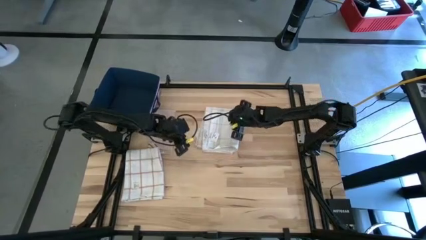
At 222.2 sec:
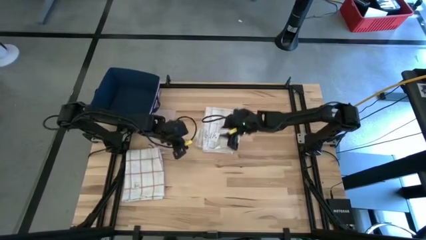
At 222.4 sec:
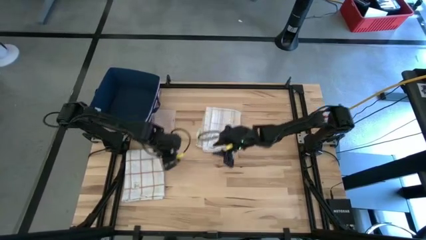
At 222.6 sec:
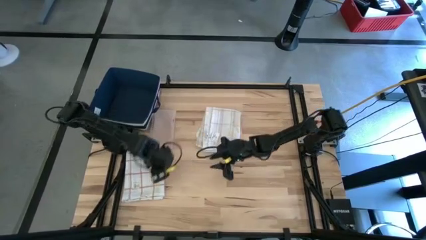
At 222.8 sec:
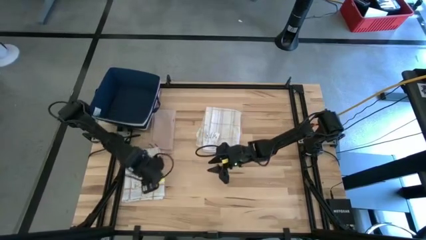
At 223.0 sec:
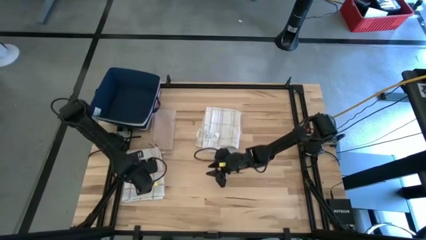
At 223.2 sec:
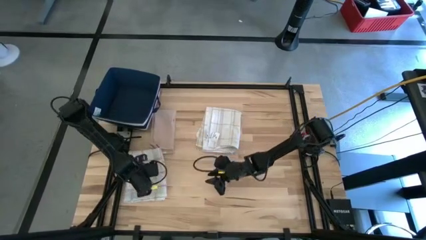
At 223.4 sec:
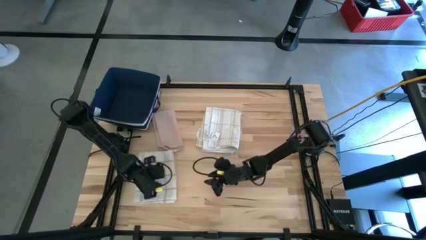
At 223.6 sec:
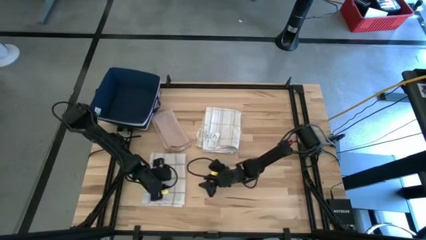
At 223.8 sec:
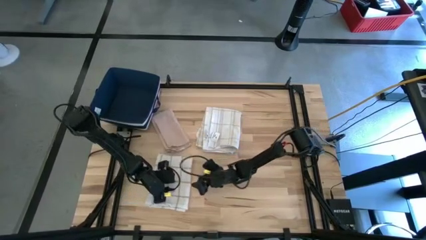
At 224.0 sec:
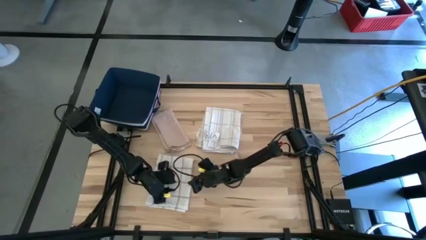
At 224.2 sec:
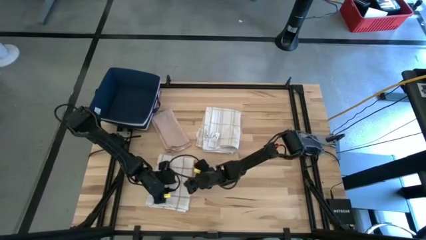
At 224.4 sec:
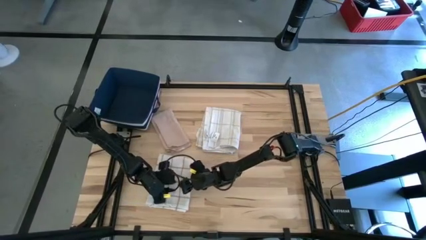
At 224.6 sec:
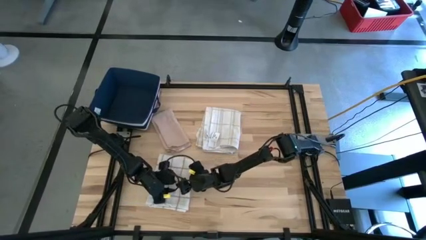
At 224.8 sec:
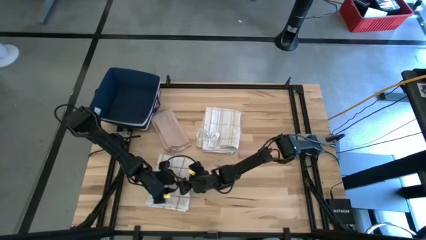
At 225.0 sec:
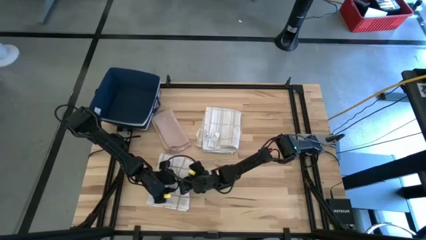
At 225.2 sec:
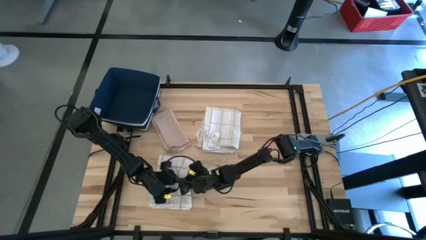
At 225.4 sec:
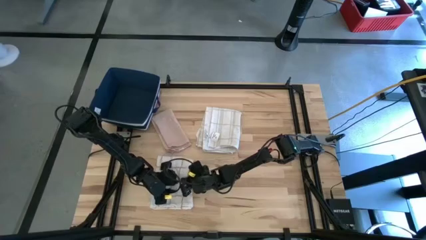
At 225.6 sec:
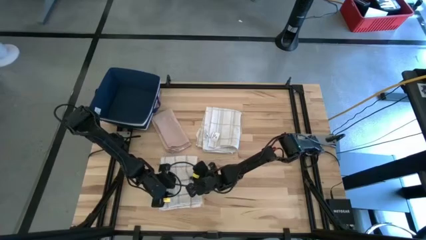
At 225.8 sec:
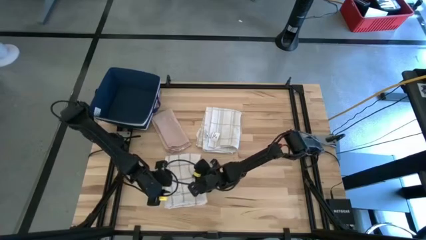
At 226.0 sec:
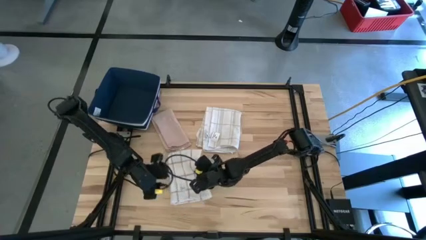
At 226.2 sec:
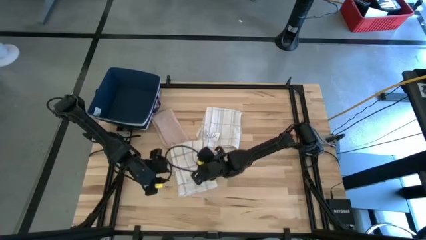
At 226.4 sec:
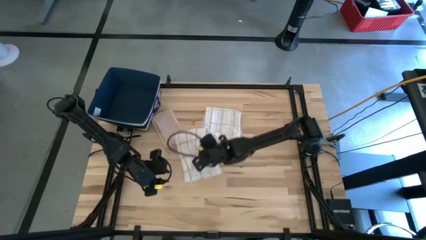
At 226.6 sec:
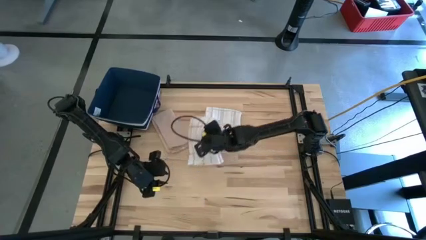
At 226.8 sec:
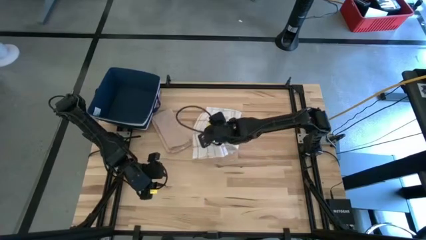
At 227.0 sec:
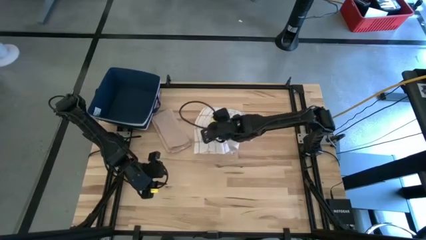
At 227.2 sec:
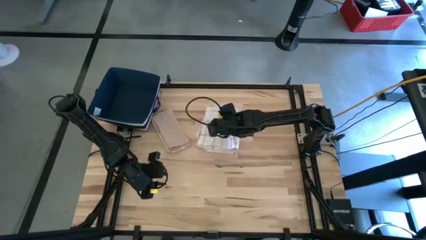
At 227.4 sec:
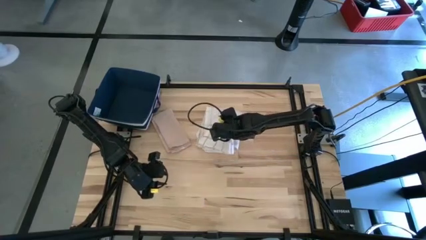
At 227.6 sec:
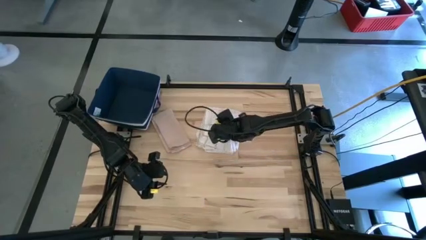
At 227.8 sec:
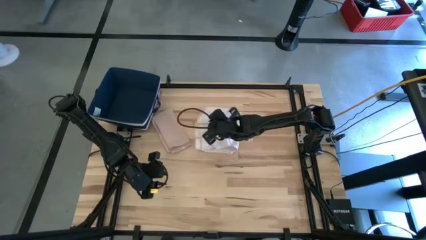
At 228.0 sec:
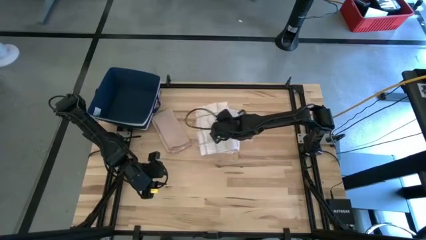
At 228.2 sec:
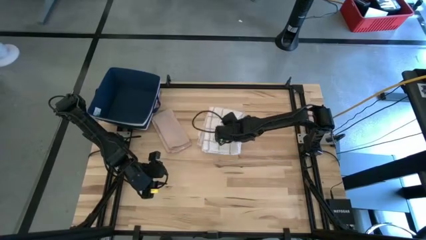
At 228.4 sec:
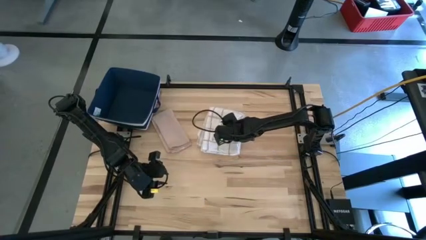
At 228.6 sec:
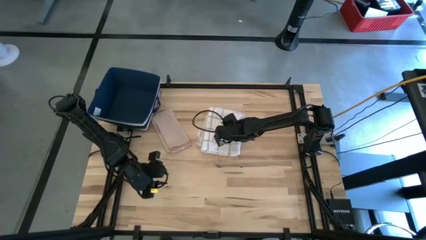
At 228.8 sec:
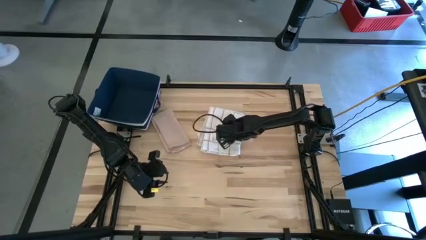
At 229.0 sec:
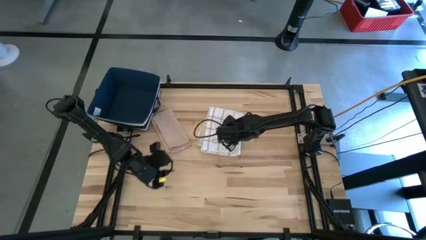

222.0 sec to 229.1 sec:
Task: Fold towel
Stack the left white patterned towel on top of the right white patterned towel

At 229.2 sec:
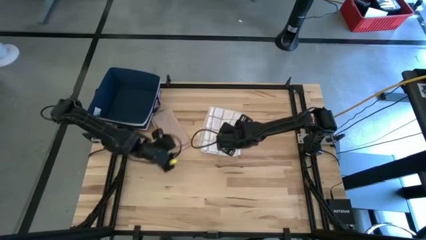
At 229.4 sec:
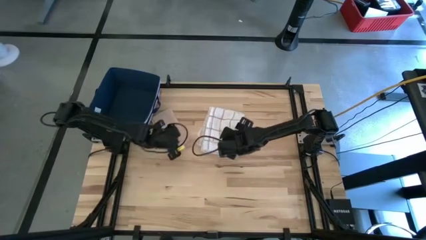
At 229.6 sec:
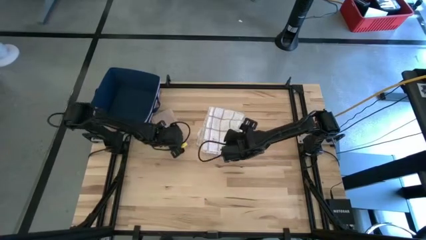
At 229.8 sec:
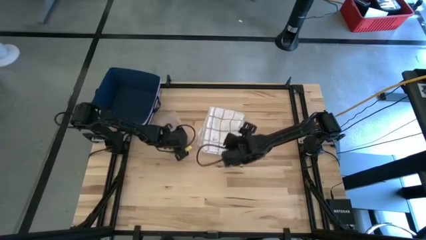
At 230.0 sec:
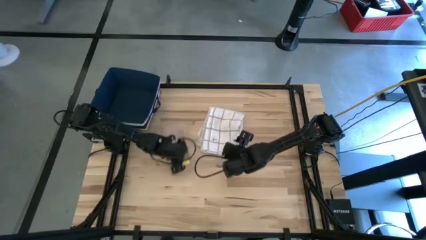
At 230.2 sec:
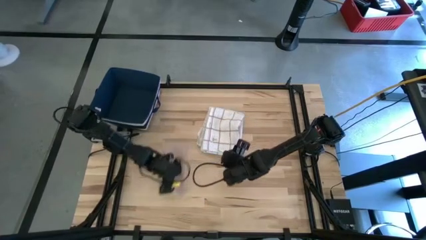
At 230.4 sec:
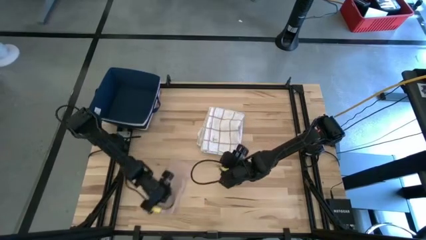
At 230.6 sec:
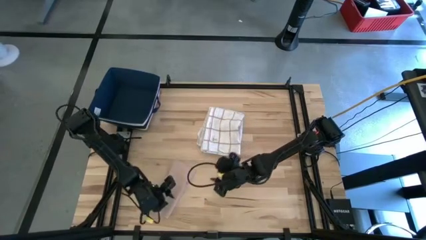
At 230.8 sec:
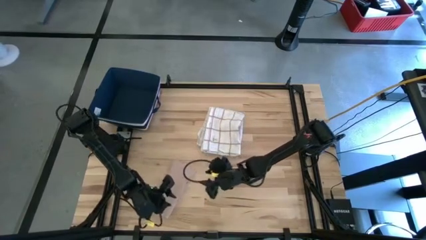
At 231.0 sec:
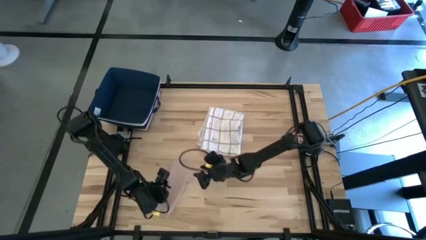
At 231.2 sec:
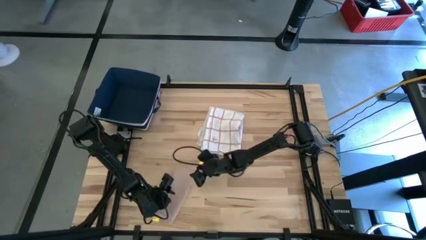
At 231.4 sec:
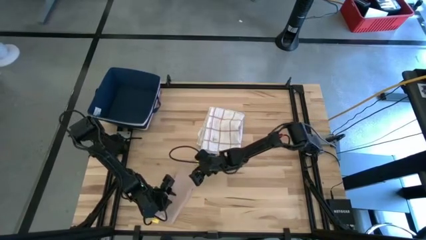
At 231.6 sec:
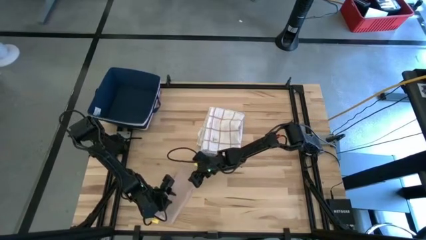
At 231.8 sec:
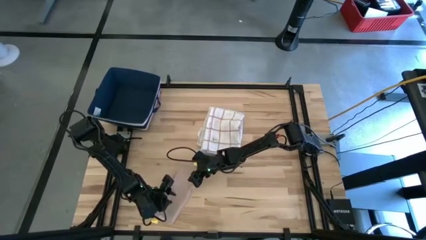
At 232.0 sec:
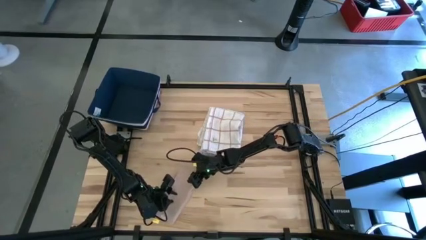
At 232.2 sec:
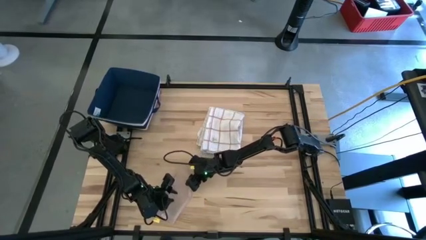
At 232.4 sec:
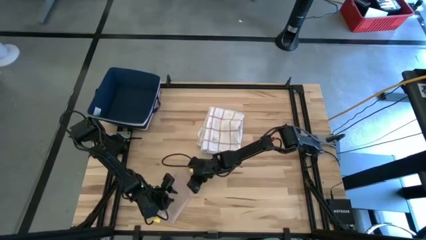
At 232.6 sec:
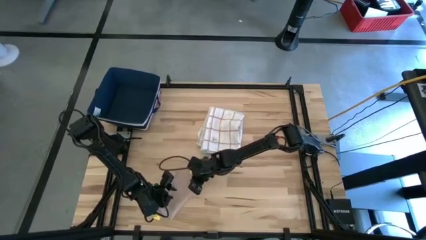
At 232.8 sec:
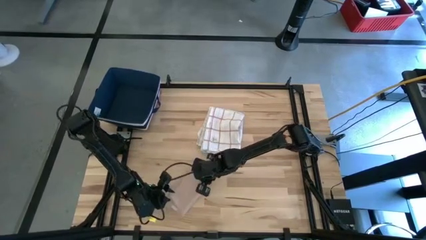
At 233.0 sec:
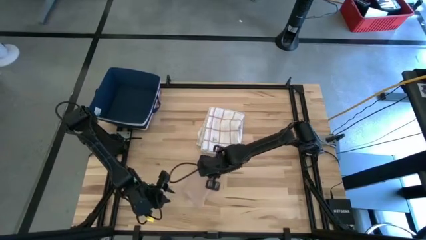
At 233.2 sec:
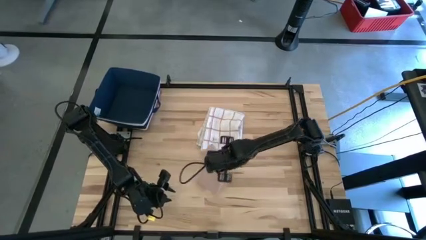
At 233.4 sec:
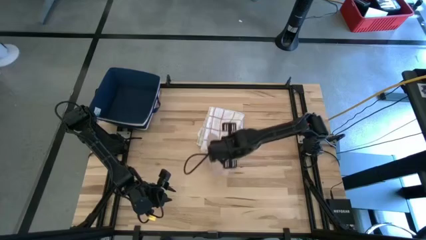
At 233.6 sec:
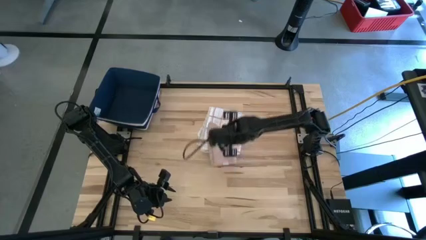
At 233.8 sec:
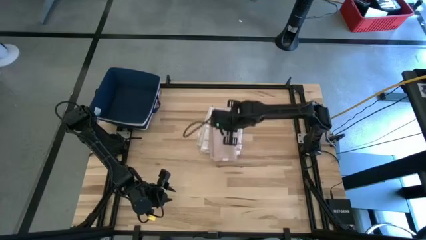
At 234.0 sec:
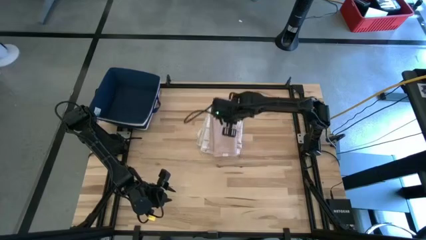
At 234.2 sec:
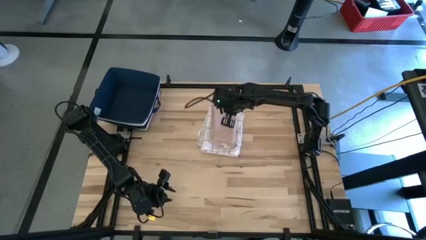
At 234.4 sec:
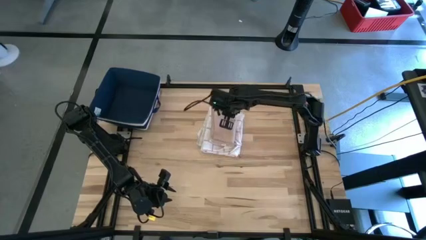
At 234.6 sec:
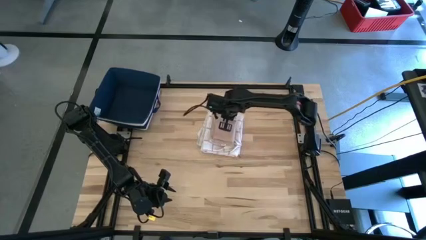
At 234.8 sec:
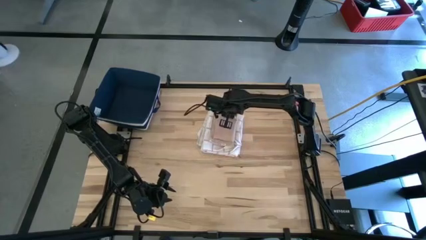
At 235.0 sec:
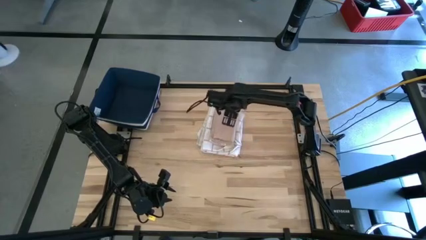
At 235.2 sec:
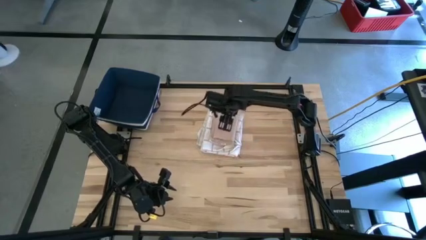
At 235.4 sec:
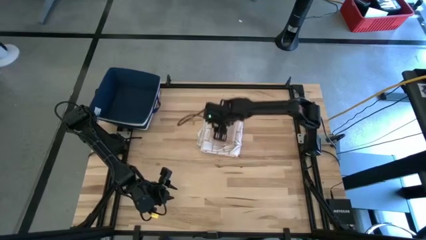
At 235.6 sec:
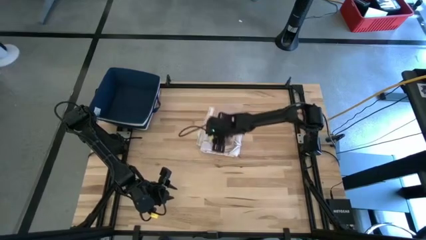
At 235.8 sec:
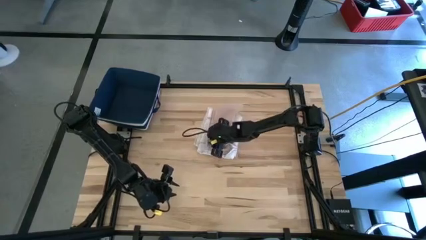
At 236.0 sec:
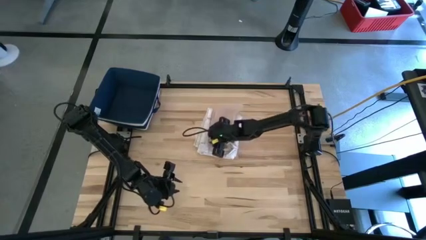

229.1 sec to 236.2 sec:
Put the light brown towel on top of the white patterned towel
